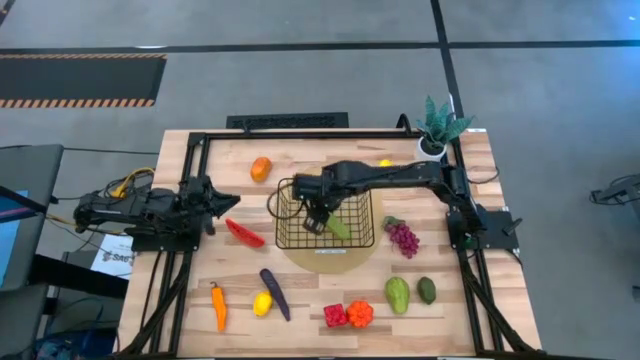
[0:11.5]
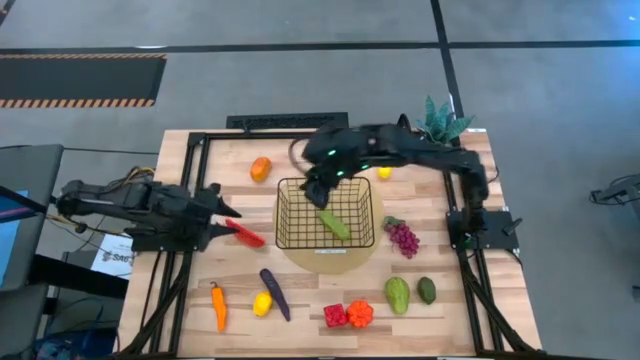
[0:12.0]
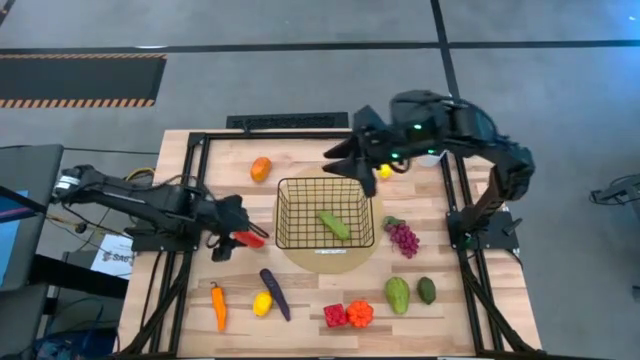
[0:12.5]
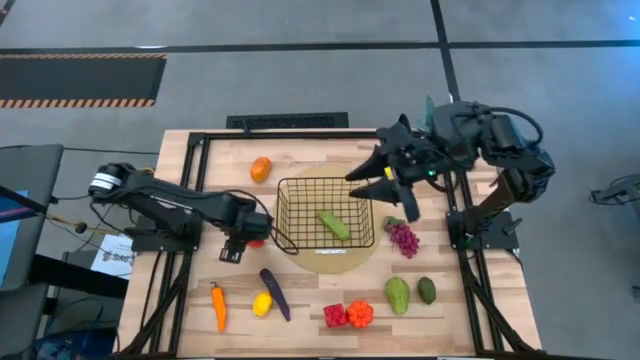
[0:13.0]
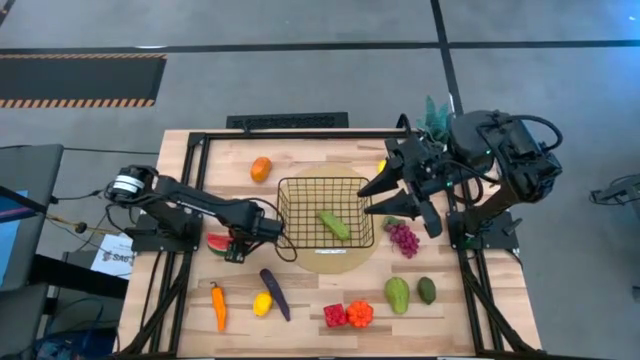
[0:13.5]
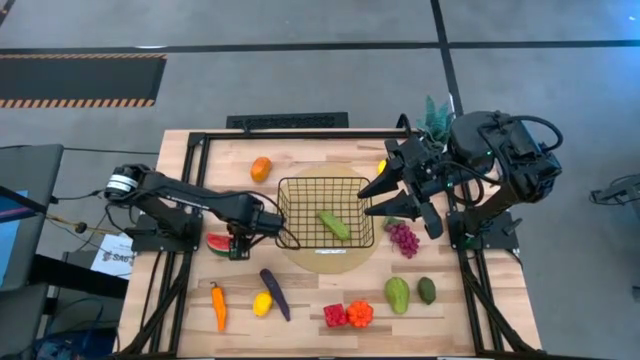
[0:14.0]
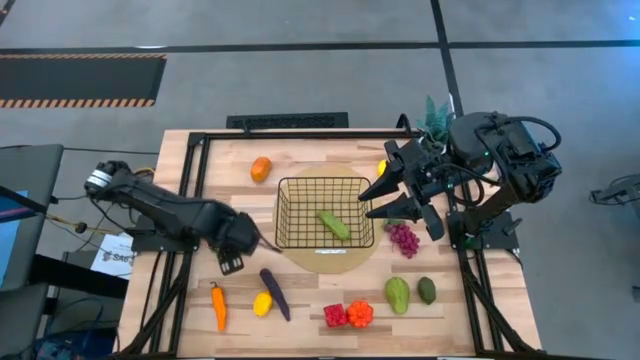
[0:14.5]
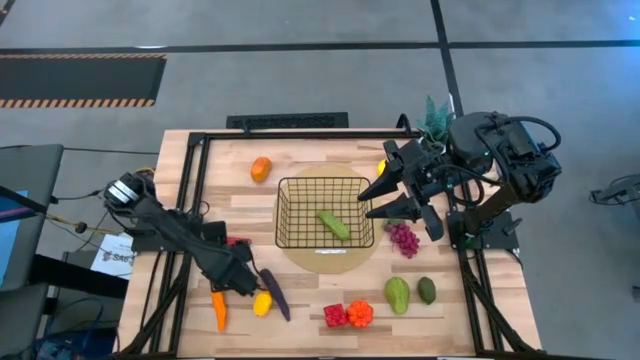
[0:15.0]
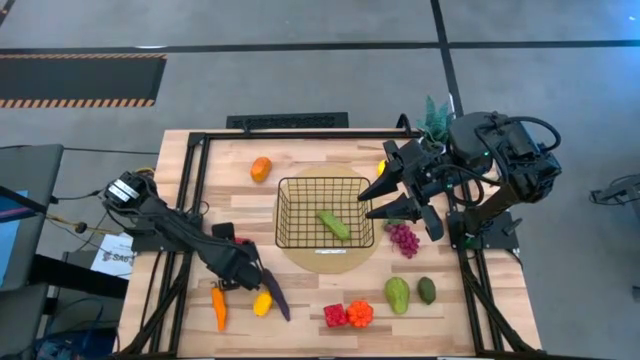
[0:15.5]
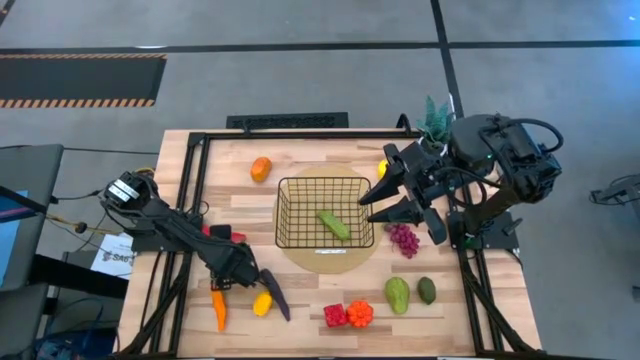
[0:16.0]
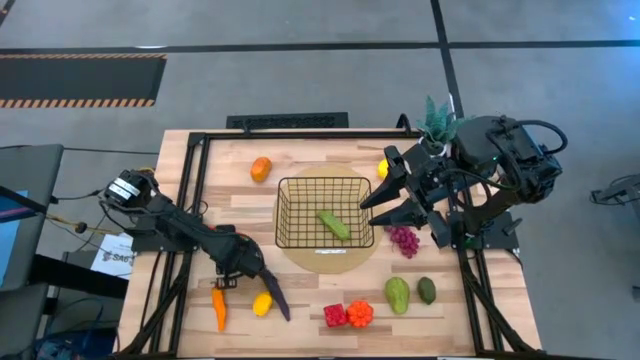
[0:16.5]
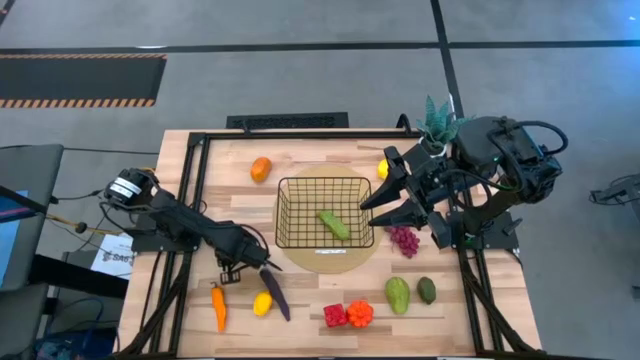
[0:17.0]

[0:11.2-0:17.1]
Task: Build produce basket
Put the green watermelon into the wire basket

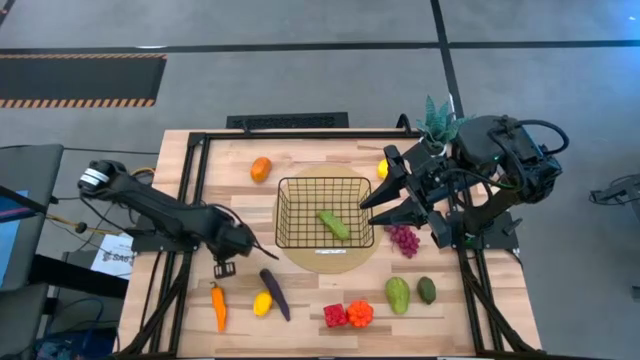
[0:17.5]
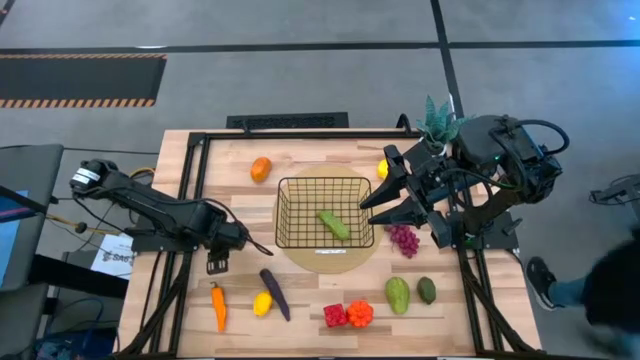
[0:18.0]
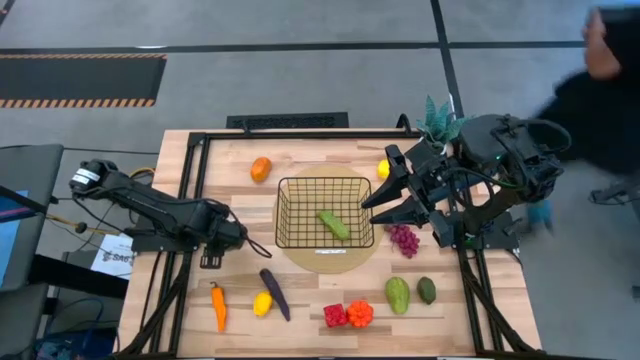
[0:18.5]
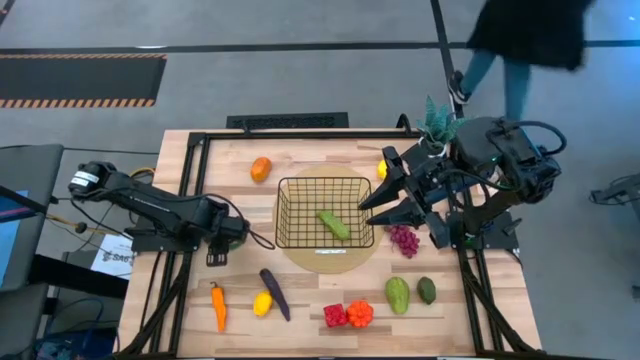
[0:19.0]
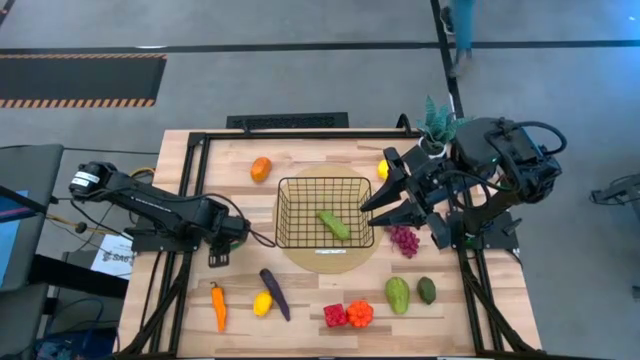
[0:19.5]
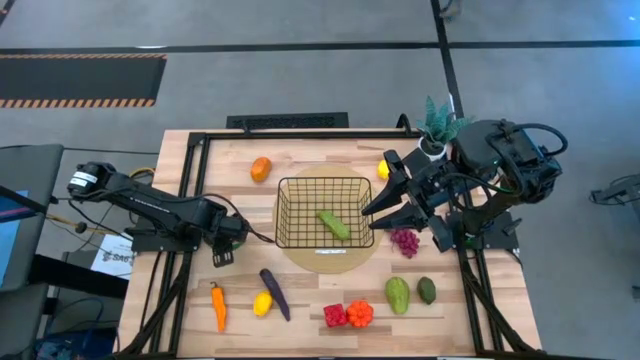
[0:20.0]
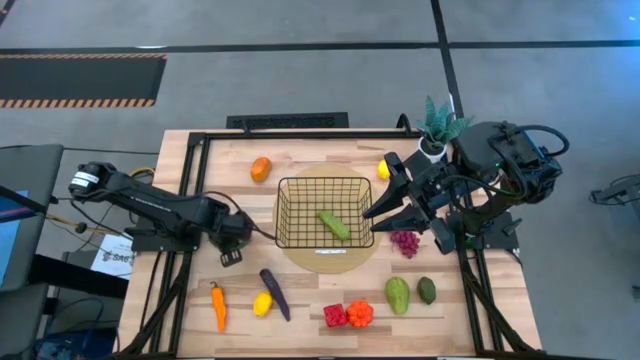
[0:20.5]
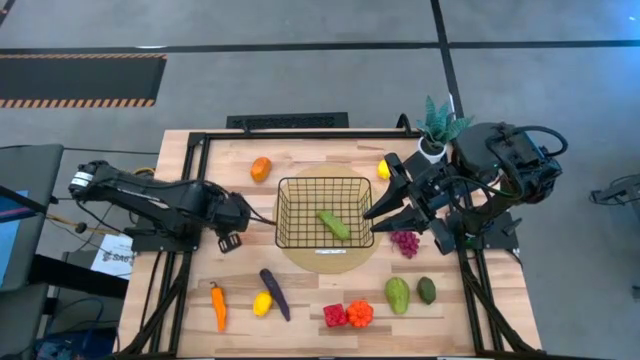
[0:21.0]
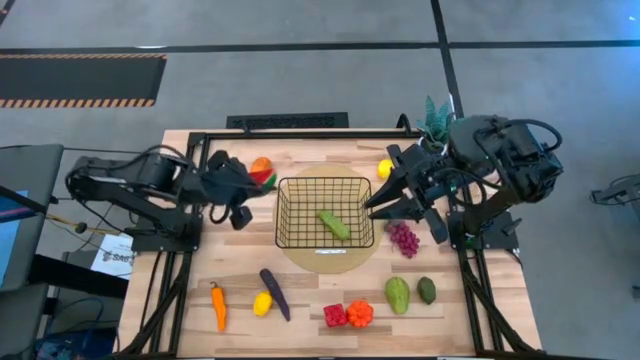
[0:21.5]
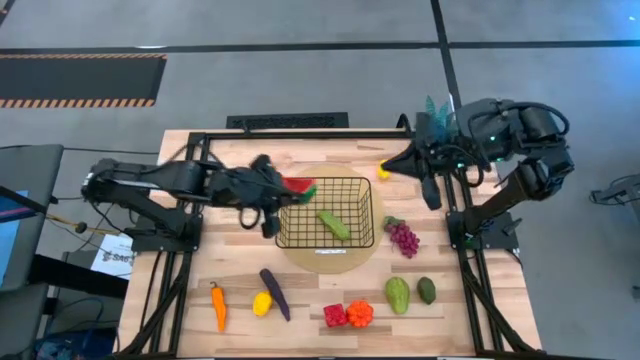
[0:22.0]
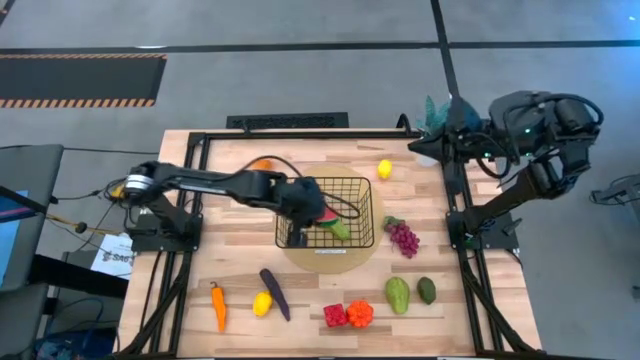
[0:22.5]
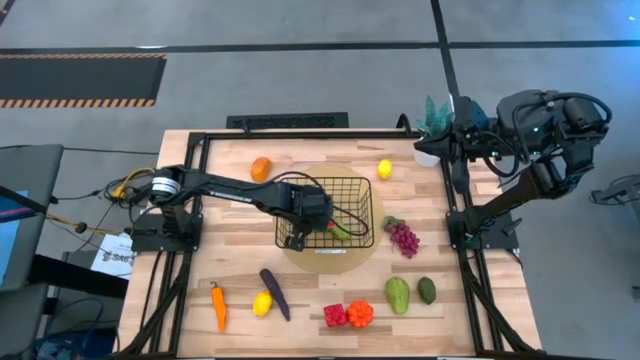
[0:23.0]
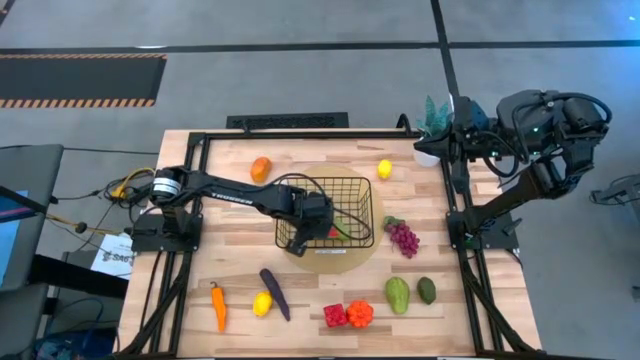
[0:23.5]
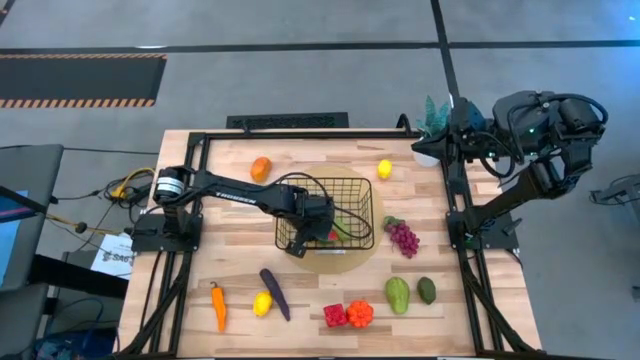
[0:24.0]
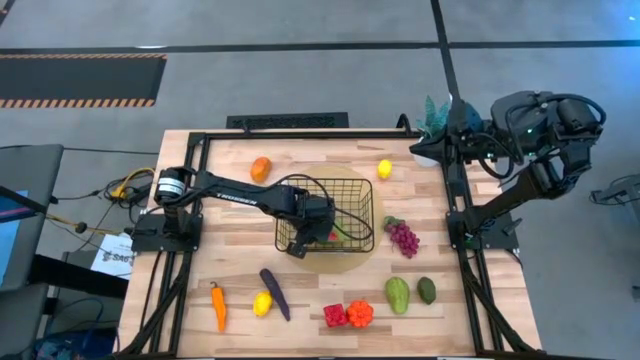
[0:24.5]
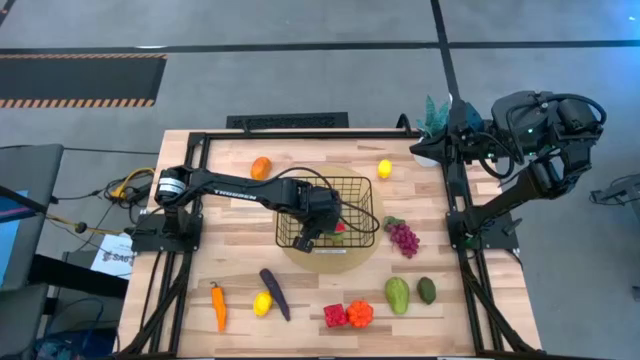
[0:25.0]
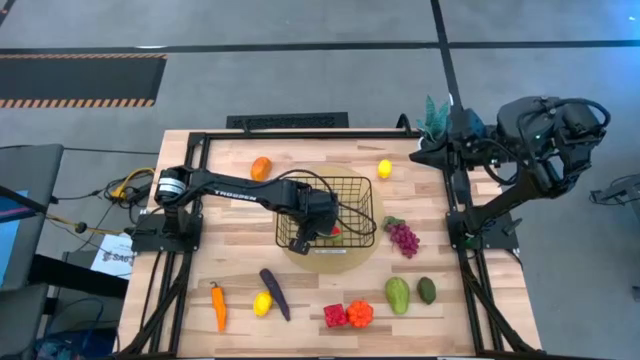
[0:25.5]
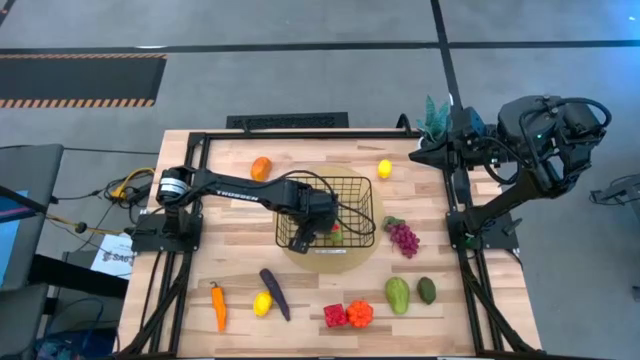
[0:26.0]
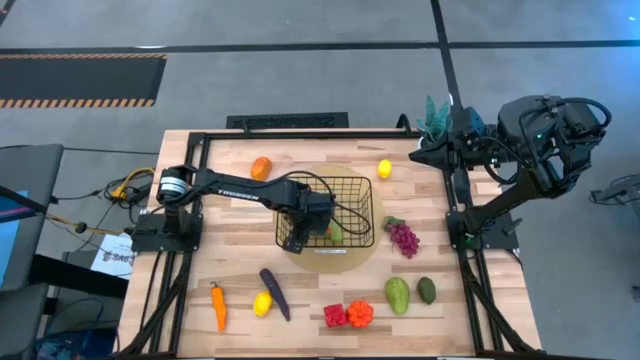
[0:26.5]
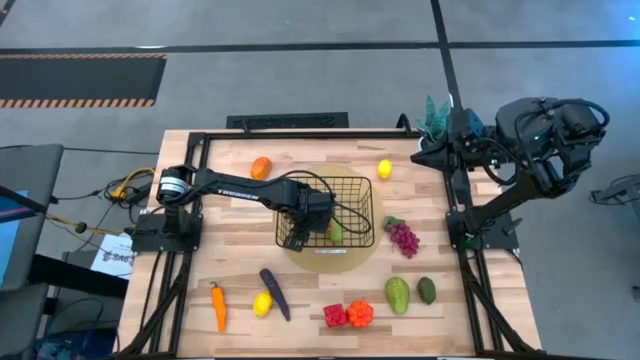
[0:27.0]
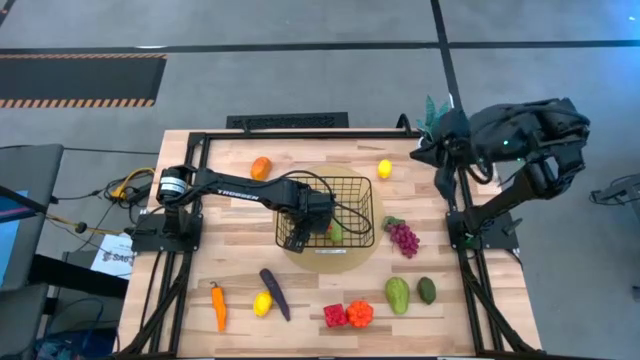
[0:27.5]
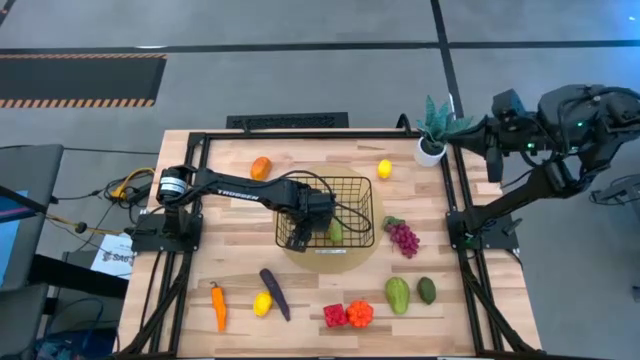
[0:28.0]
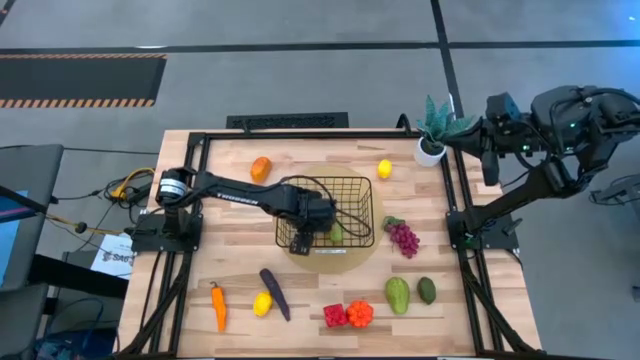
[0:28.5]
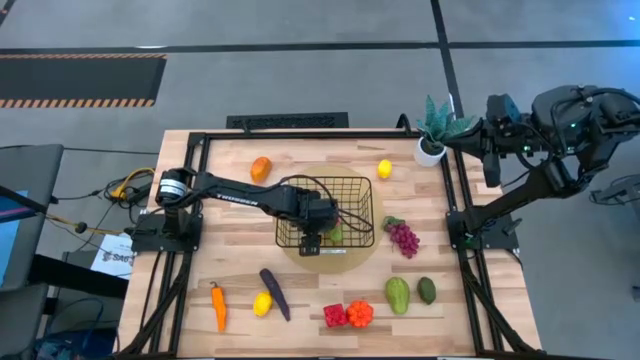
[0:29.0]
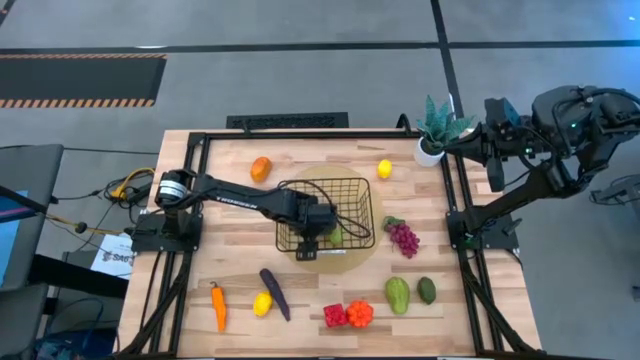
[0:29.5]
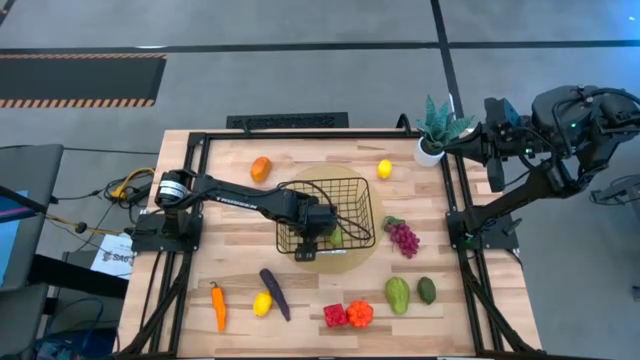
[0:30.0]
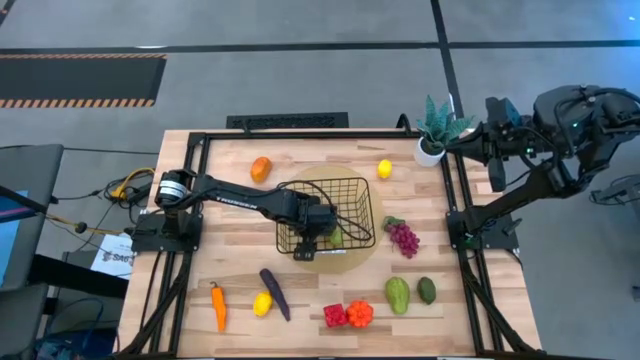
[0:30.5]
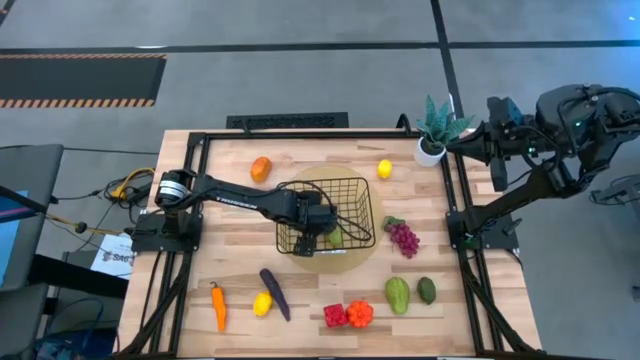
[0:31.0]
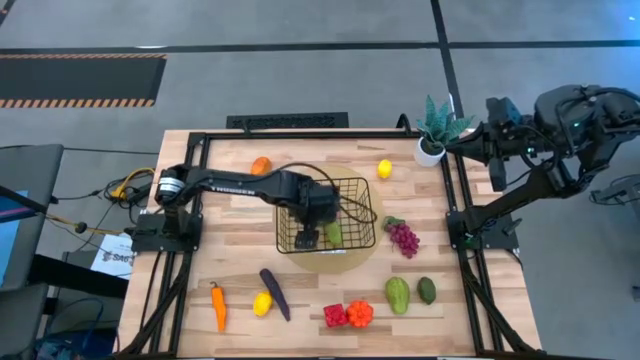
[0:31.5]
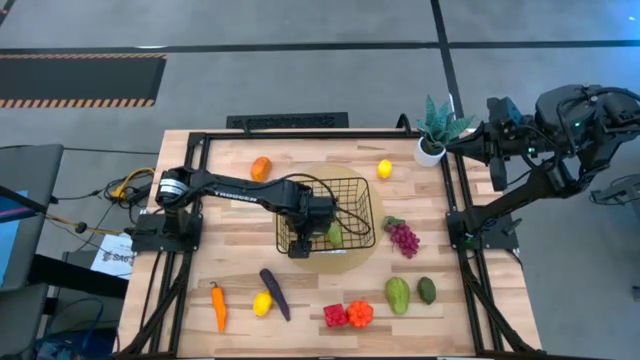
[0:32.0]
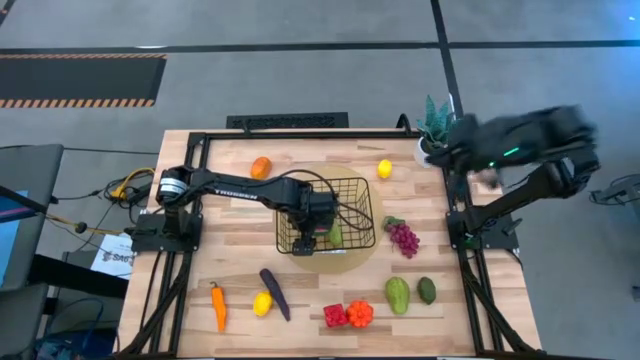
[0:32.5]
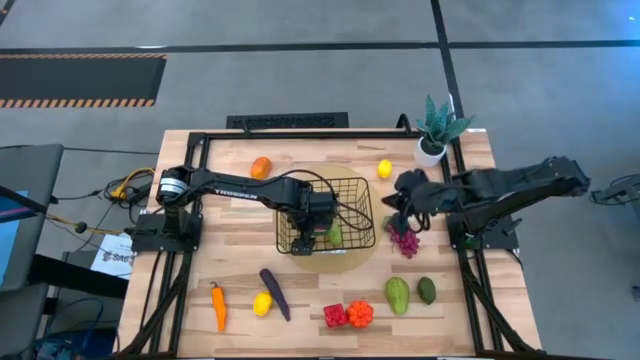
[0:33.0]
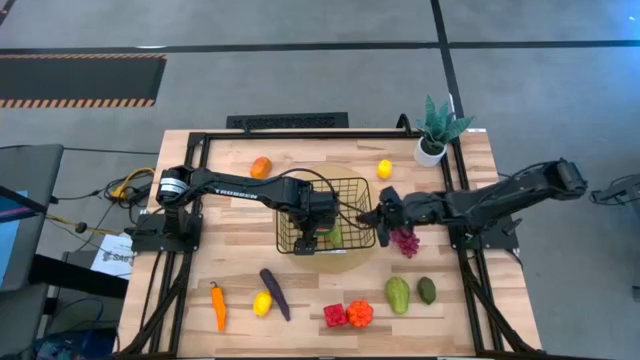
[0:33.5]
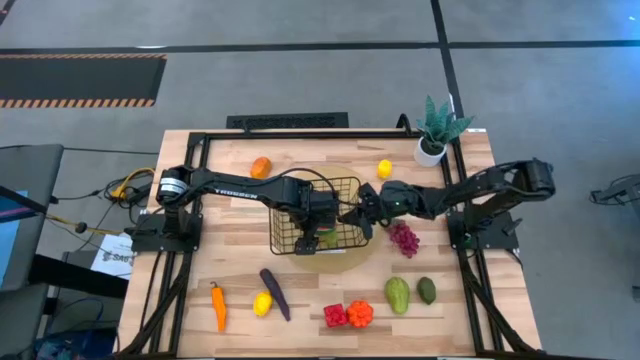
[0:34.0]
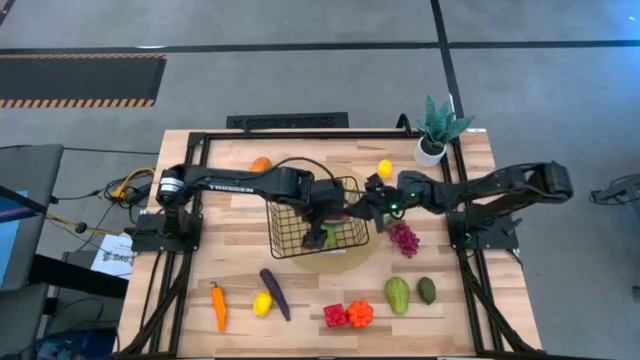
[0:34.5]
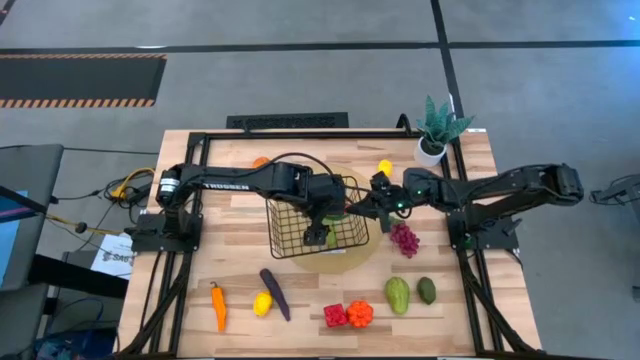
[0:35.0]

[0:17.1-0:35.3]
Put the green watermelon into the wire basket
